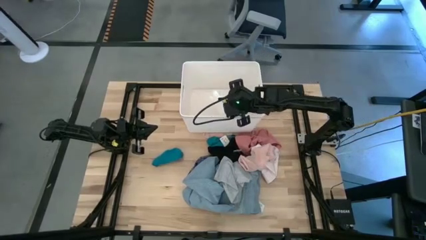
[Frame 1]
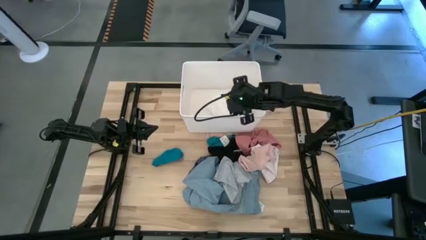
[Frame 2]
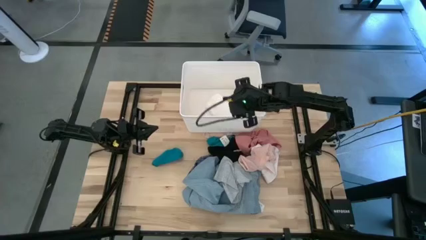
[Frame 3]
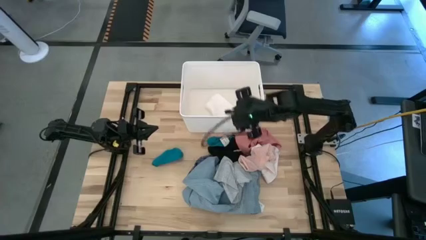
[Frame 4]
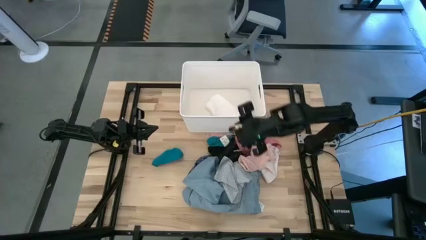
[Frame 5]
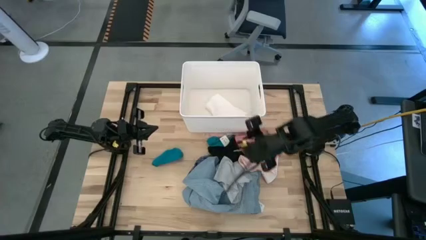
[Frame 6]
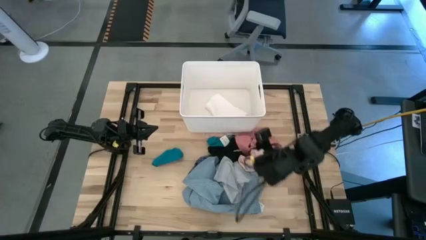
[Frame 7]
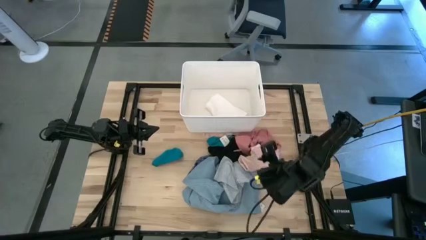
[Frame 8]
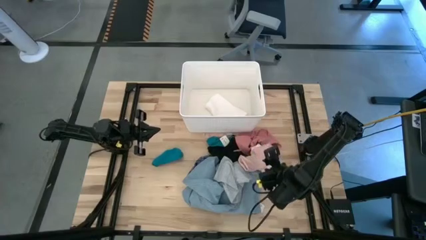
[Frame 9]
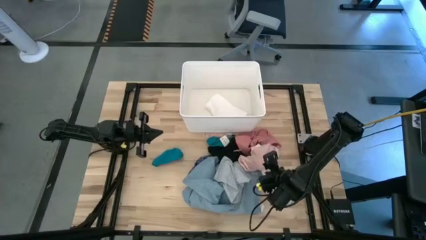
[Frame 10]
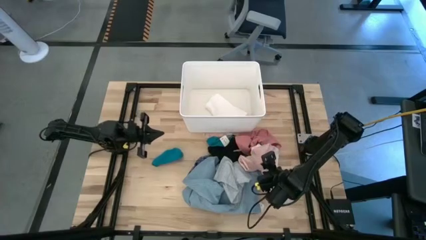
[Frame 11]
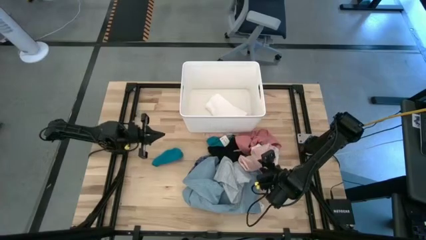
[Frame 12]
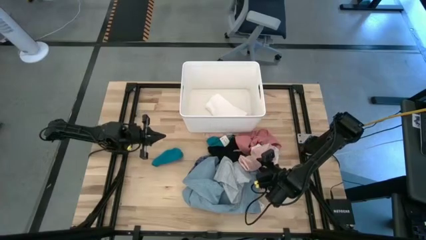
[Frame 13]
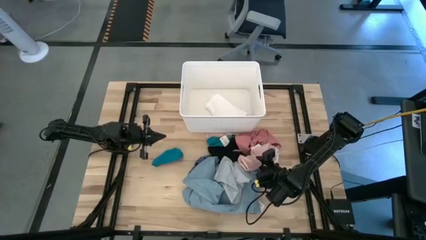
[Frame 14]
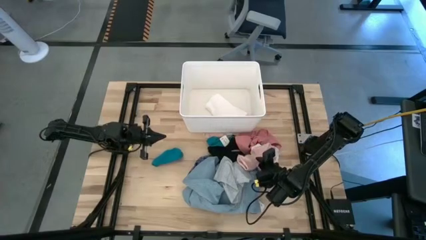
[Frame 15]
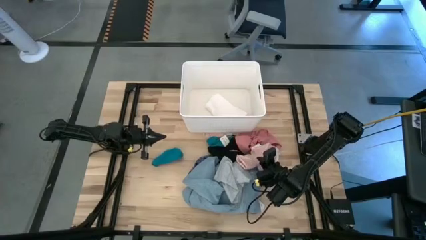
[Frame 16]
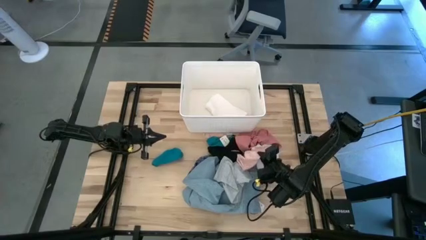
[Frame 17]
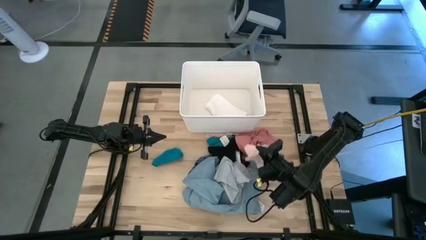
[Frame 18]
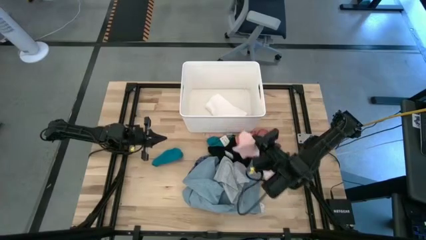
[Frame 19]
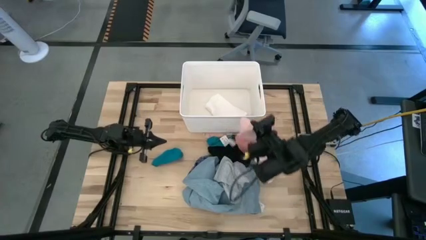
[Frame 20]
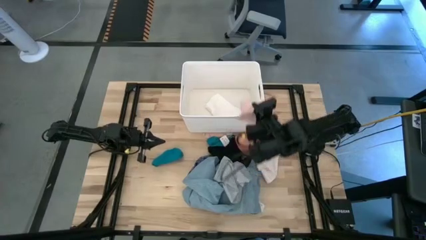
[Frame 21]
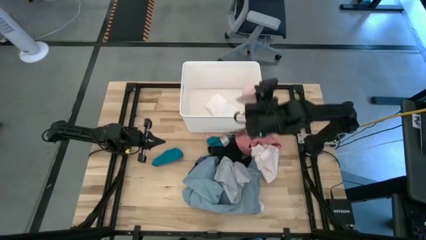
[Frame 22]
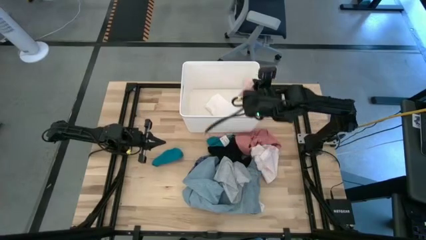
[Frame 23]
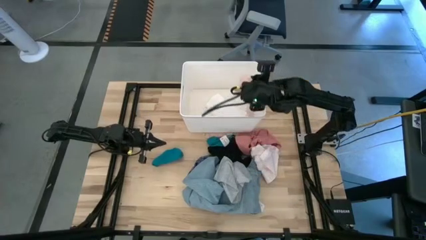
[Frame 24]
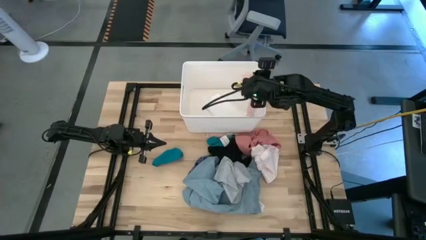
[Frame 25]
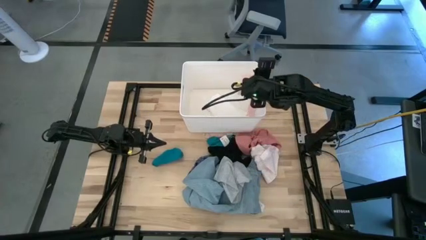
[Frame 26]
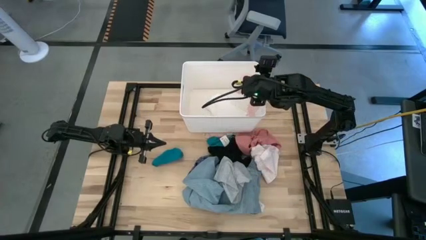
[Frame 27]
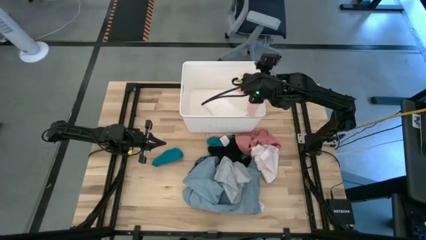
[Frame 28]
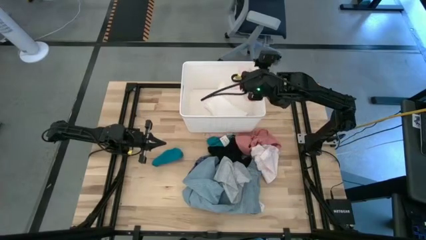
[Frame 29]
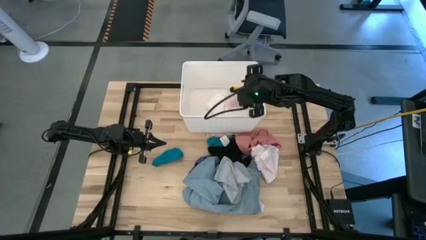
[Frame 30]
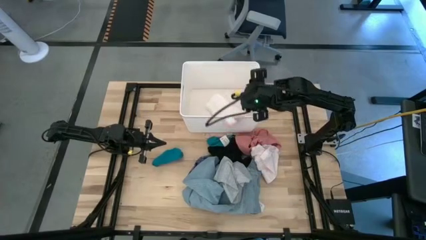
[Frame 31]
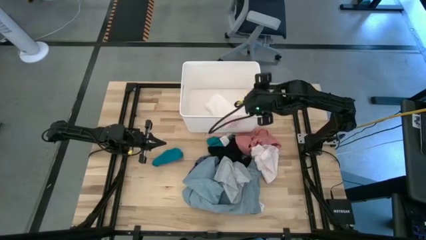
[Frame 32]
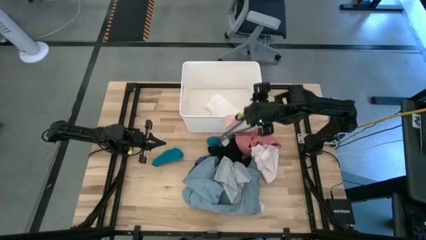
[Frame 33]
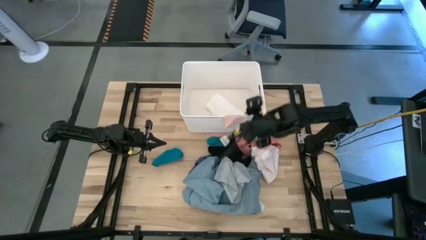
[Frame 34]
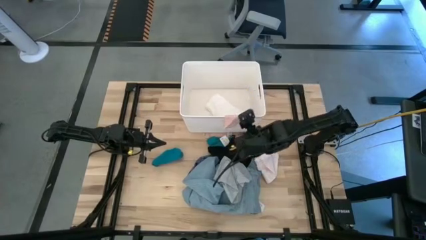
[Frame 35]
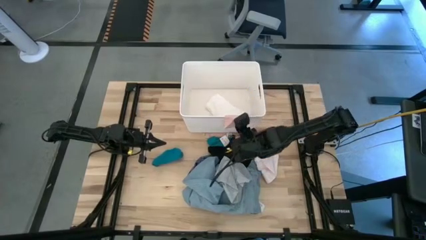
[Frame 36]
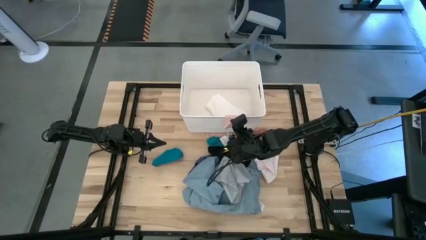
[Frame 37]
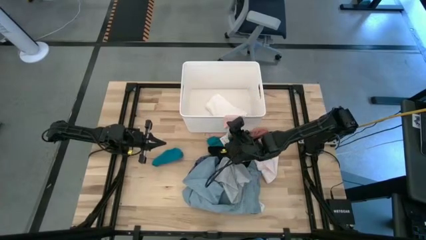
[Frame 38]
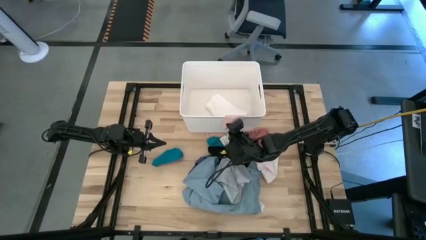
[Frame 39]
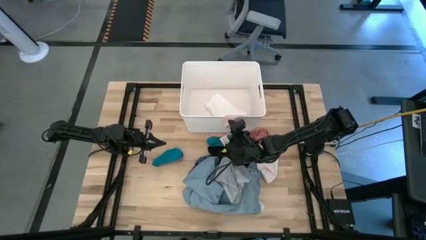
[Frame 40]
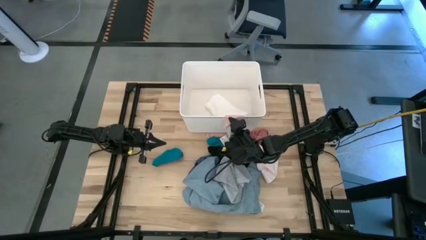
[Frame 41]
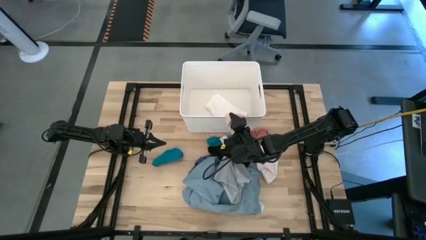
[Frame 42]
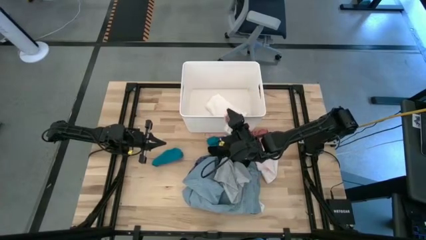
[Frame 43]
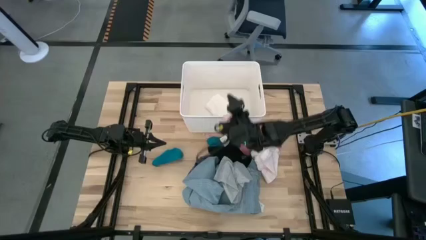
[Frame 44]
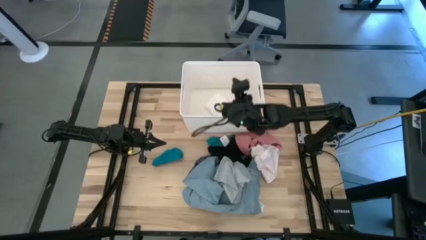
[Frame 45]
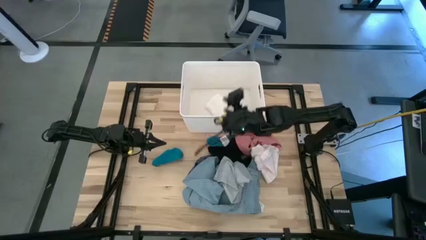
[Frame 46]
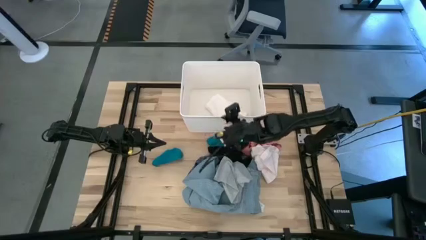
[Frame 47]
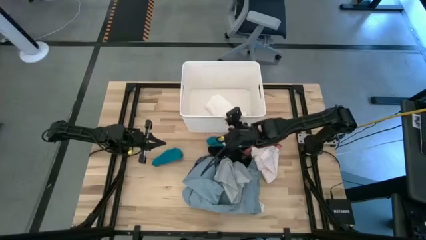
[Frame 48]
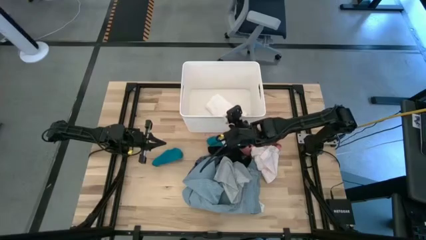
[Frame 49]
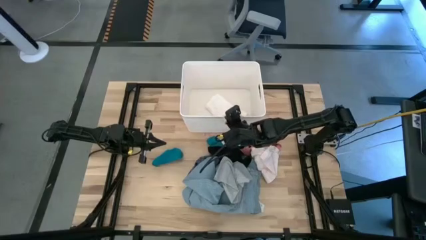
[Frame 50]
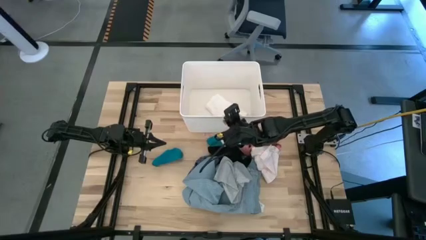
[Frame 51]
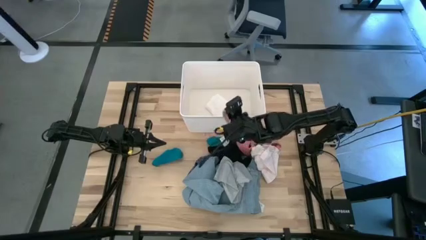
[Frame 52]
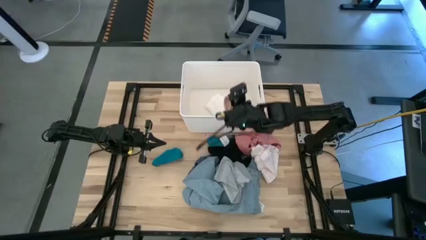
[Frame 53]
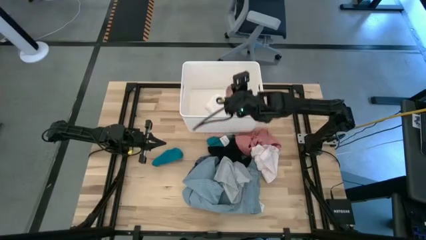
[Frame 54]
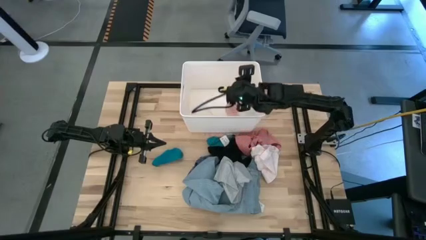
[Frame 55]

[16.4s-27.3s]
Task: Sort clothes
Put the bottom light pink sock into the white laundry bin

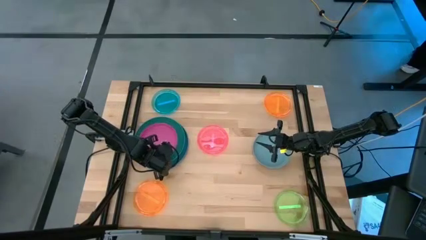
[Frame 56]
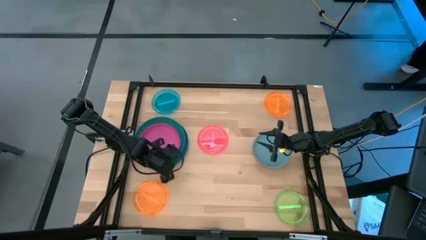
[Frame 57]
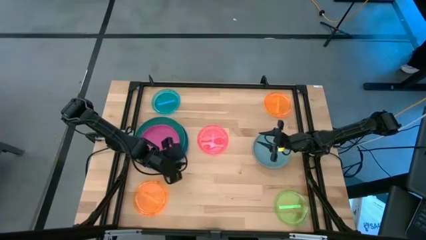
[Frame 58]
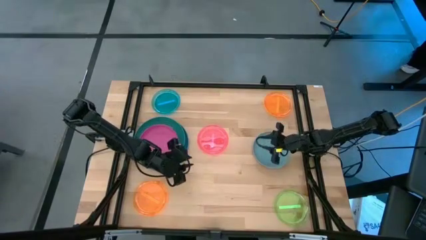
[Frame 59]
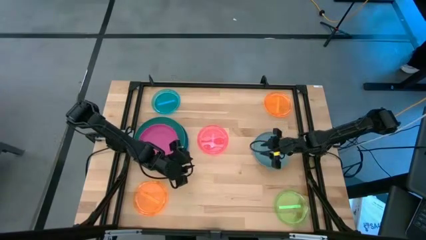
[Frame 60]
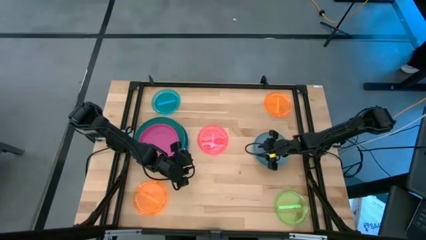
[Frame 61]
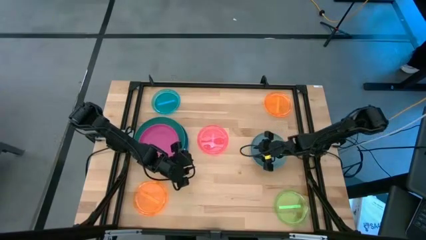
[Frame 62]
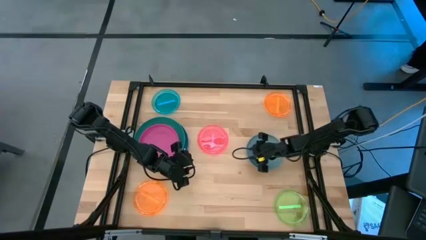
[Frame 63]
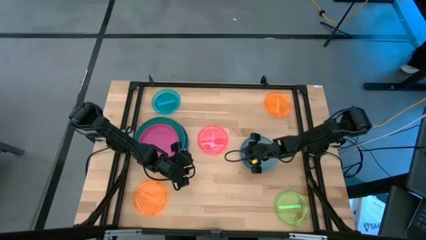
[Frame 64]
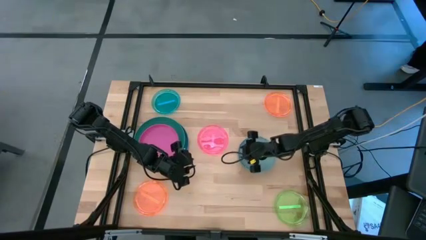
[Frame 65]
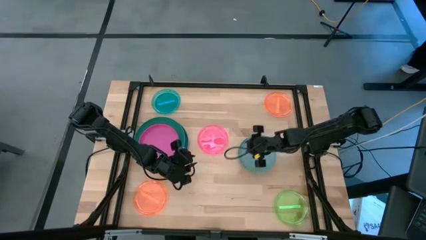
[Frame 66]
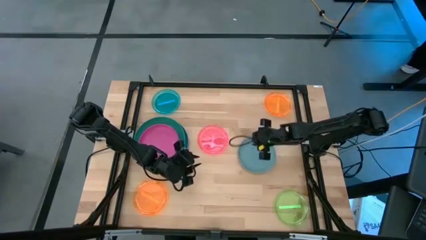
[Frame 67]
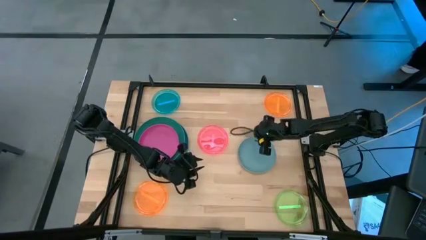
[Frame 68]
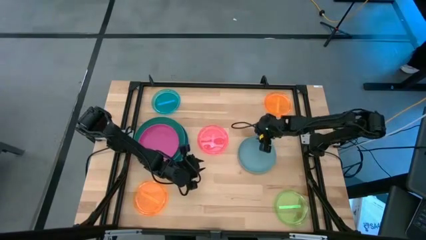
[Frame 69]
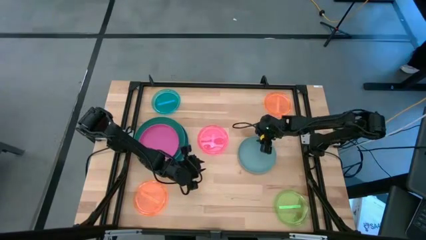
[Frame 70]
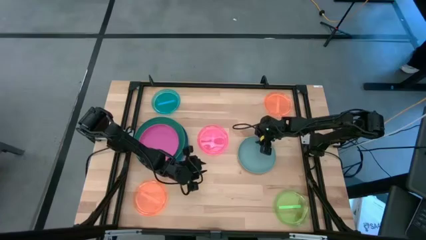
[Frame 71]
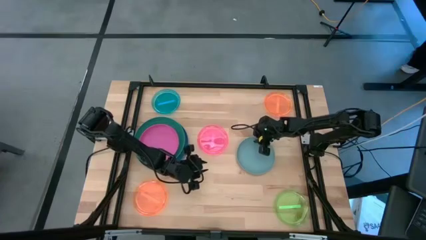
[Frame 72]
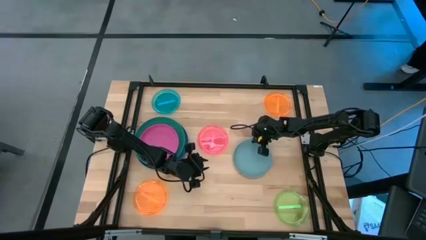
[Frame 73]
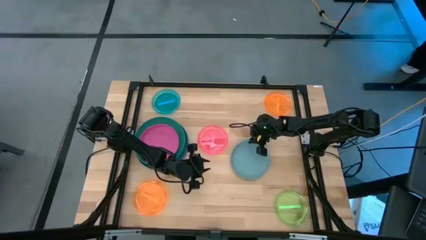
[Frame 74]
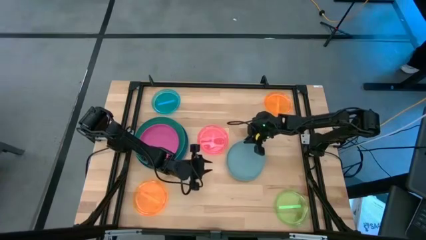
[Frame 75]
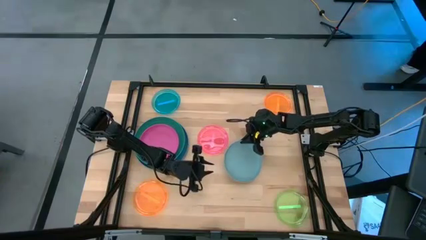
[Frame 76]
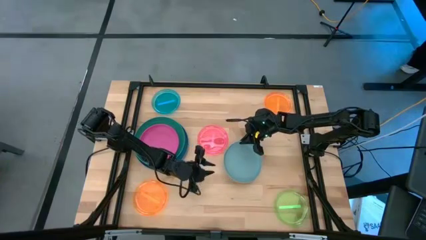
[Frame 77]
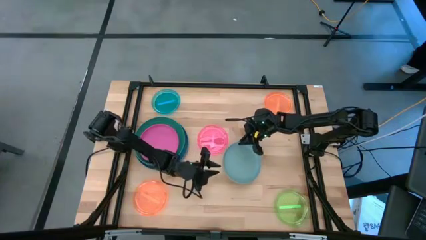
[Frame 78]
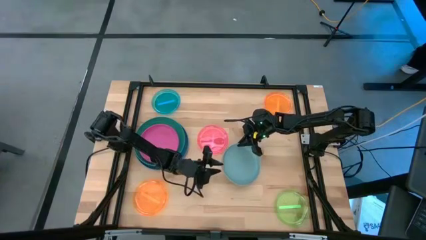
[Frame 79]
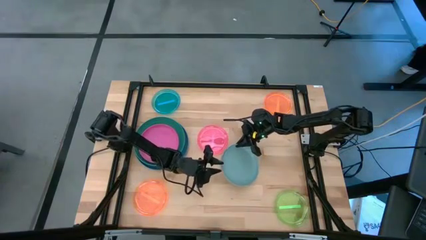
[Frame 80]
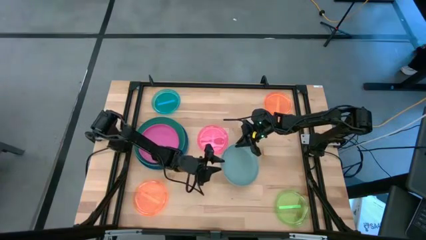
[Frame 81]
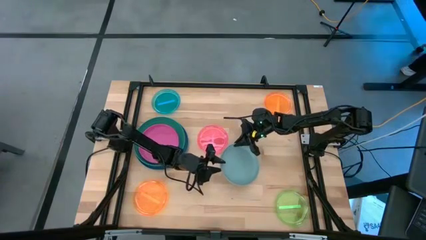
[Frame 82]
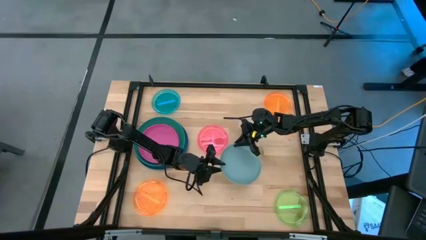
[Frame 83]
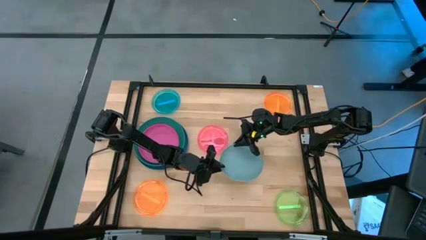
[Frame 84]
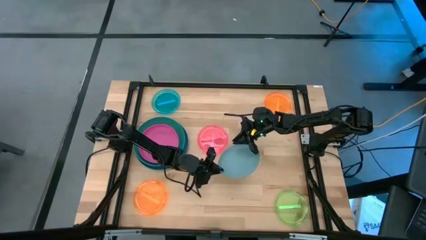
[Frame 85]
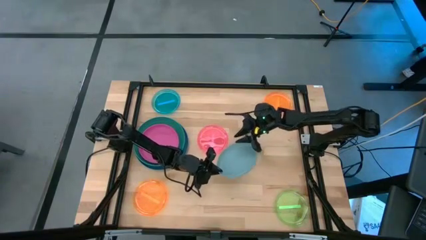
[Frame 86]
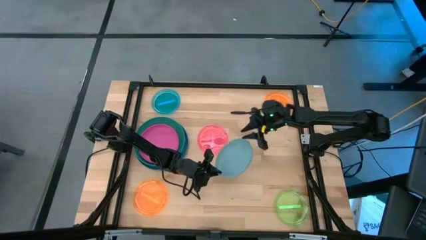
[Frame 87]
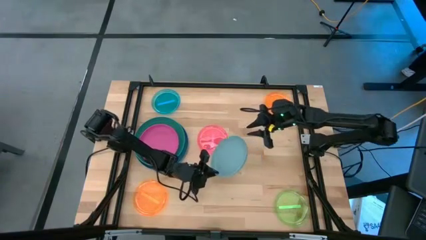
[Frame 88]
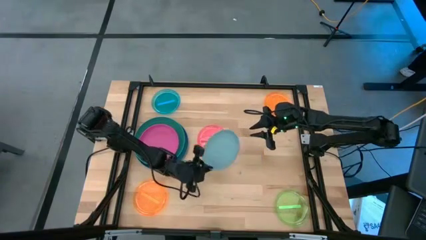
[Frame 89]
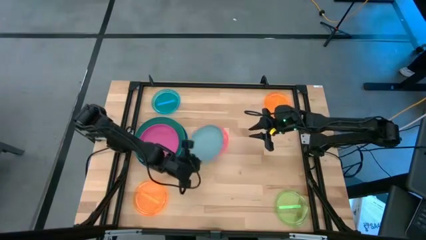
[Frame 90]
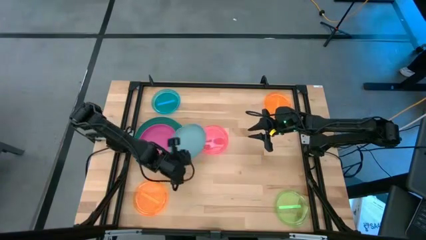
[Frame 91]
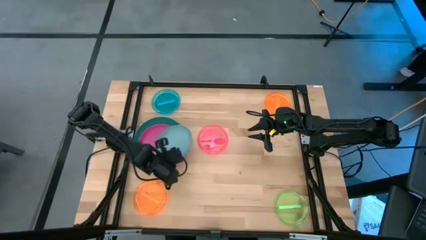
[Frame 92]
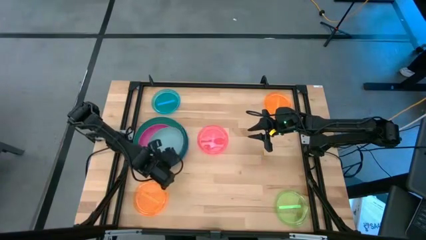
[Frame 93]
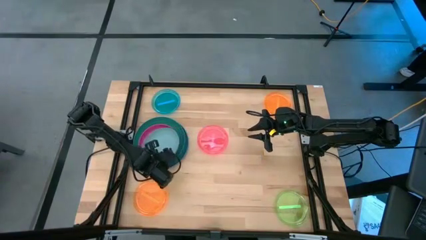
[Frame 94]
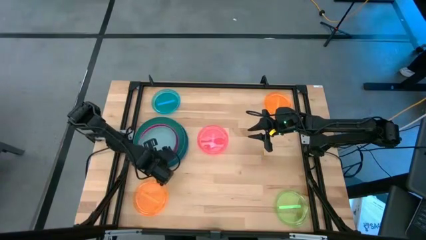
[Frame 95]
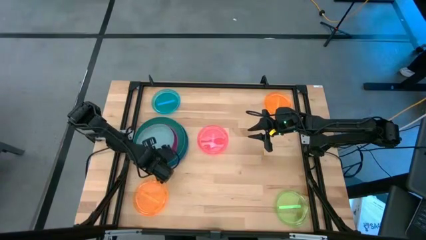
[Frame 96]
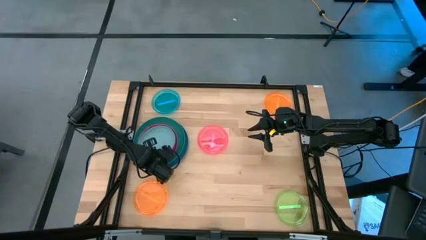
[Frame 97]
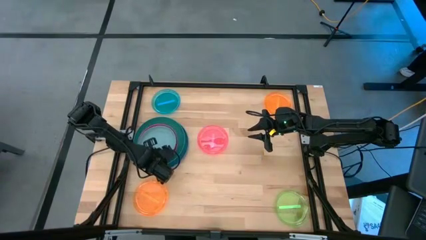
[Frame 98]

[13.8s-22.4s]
Task: Stack plastic plates
Stack light blue plate on top of the dark pink plate
